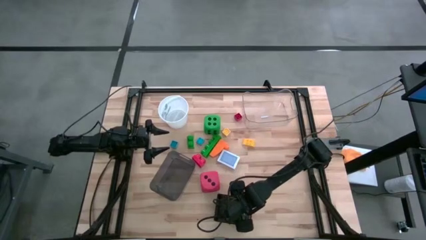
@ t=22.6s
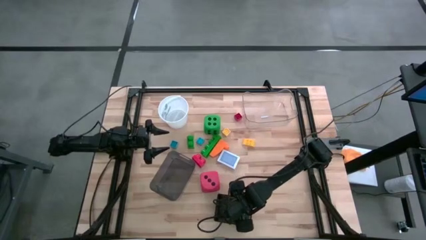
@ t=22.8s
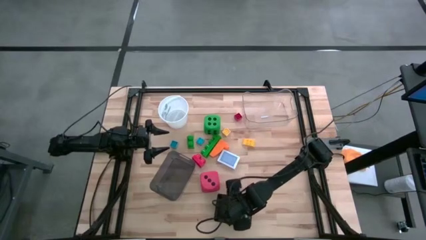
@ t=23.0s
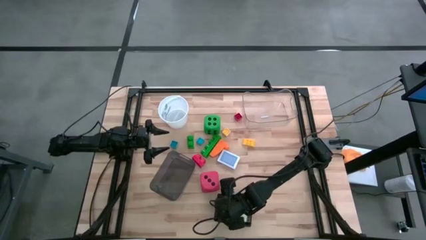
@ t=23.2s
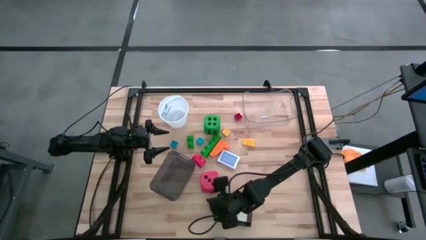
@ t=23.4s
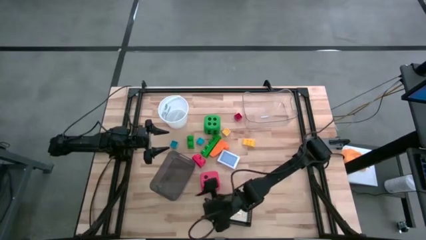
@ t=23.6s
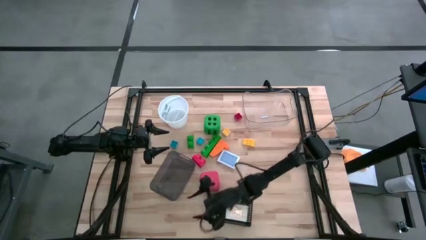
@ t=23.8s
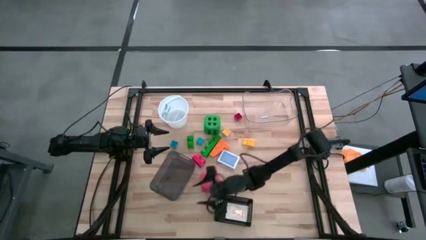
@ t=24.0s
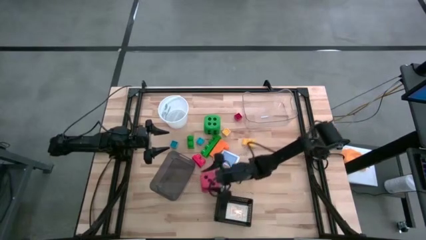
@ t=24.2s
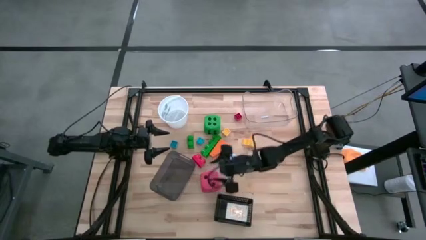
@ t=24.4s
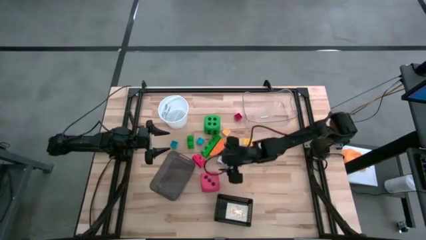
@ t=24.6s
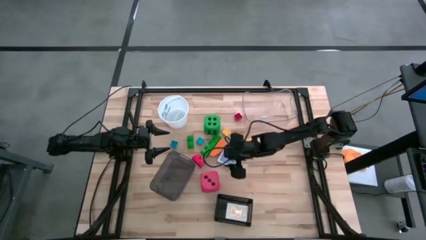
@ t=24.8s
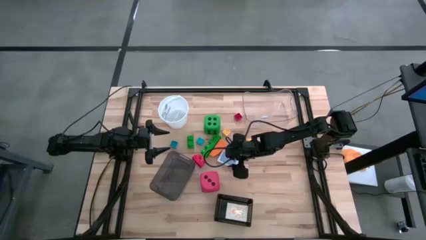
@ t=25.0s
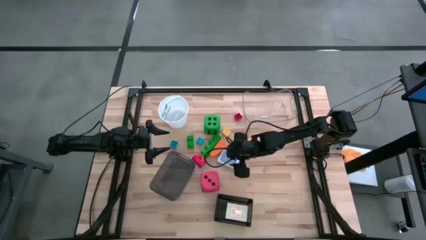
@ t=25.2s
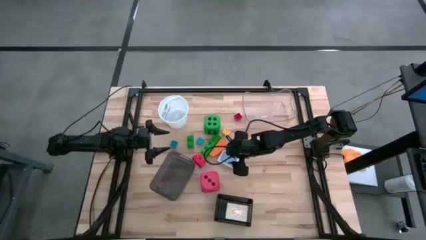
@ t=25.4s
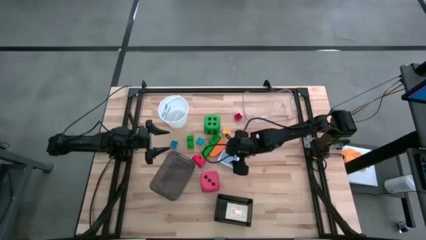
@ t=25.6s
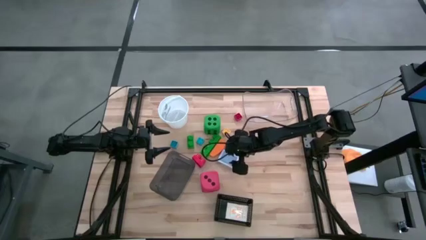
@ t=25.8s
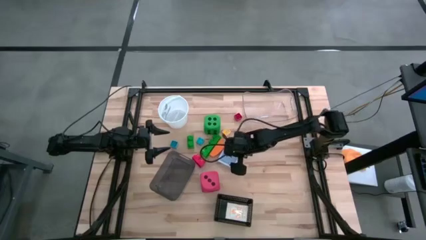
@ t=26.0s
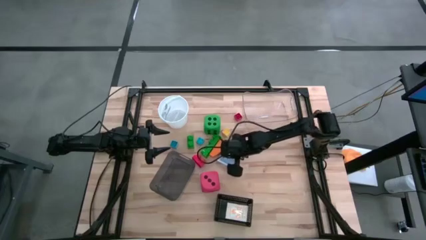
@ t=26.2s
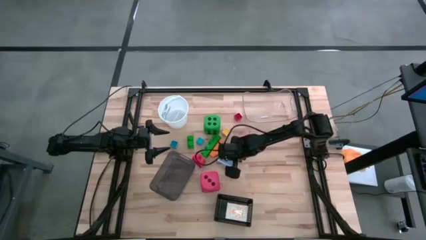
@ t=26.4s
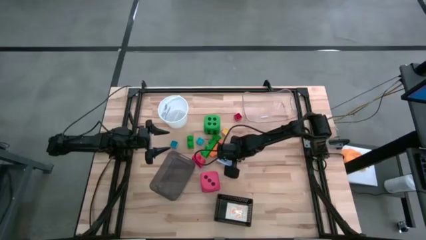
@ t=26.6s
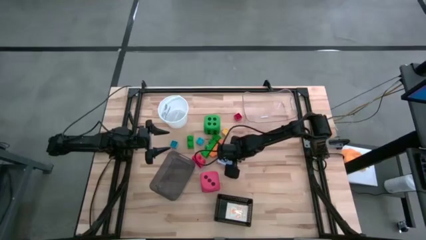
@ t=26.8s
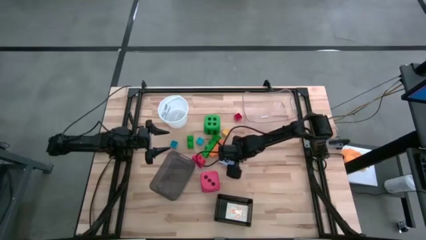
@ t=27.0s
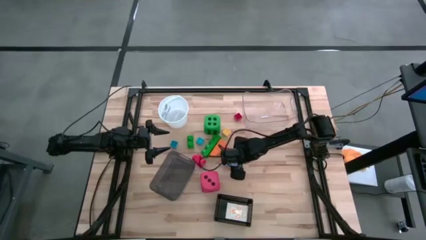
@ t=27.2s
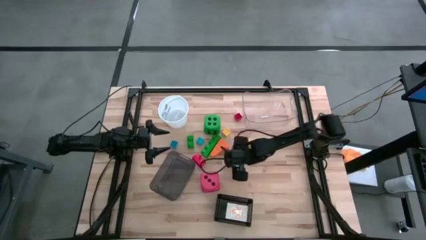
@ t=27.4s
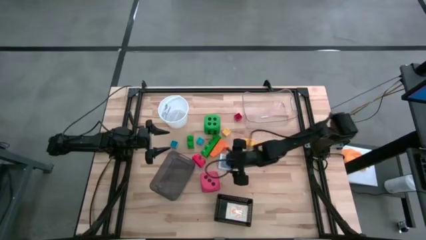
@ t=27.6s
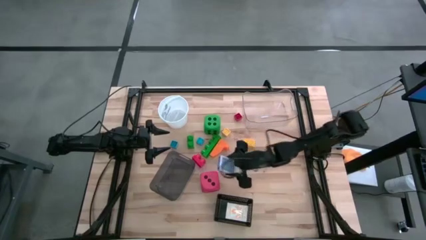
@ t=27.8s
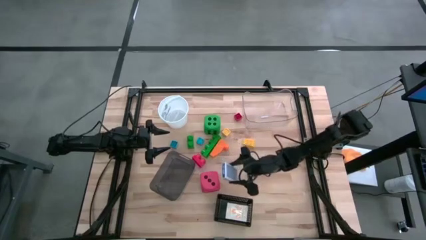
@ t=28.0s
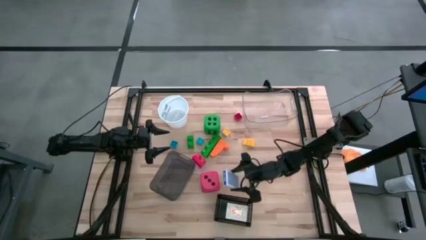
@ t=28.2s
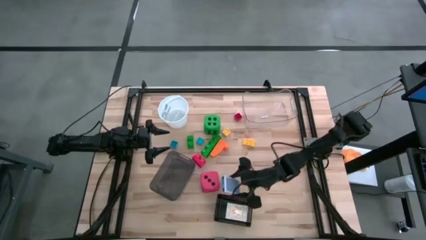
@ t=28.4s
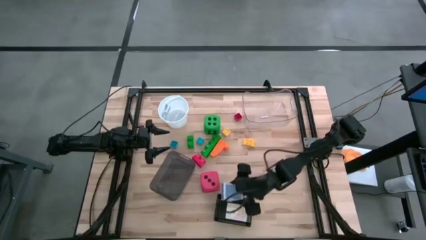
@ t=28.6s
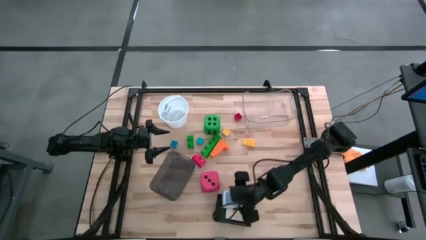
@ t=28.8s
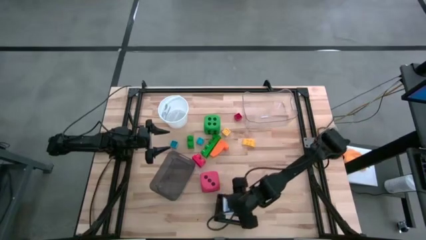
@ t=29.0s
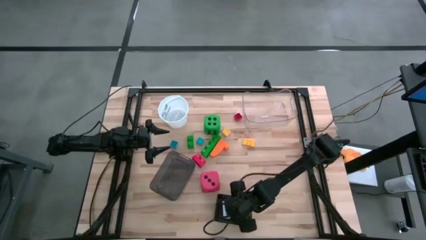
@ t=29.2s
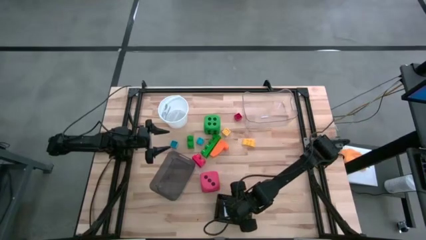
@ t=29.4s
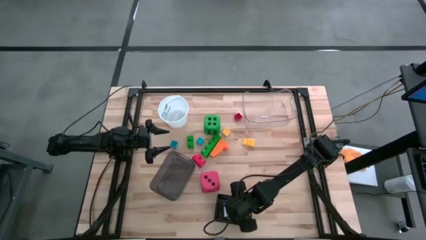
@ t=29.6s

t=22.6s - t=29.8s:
Task: Pick & Place Toys
Put the blue deck of cards into the black bin

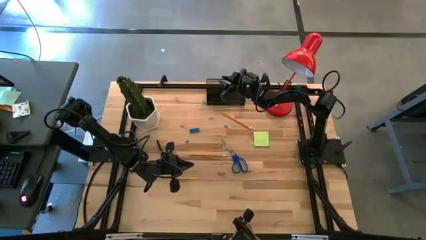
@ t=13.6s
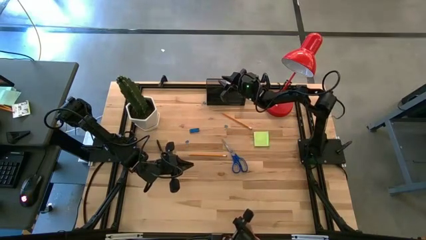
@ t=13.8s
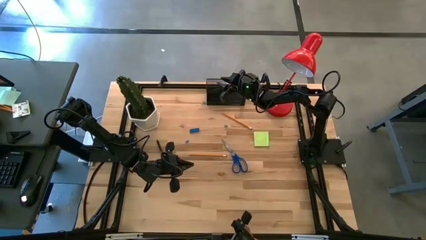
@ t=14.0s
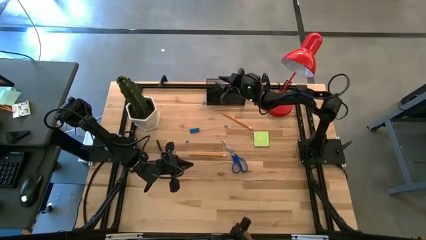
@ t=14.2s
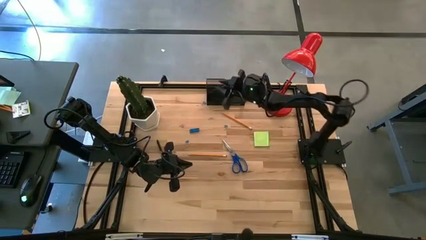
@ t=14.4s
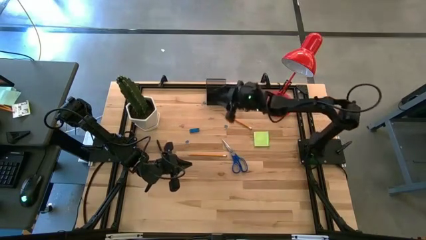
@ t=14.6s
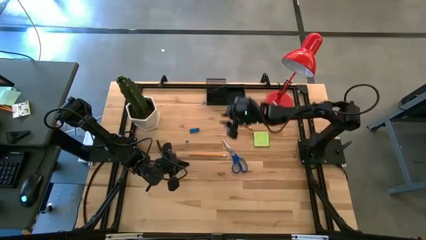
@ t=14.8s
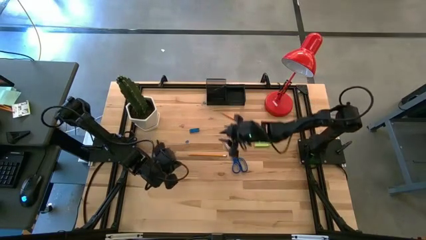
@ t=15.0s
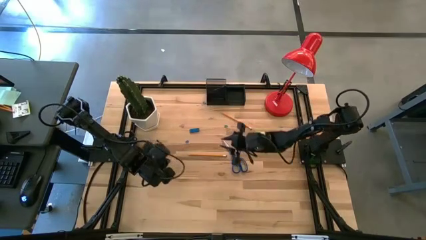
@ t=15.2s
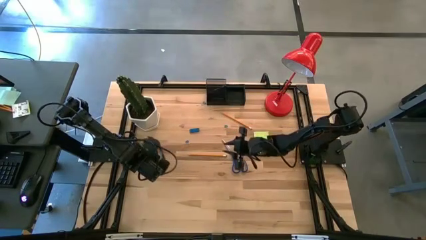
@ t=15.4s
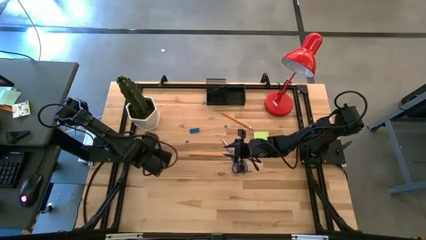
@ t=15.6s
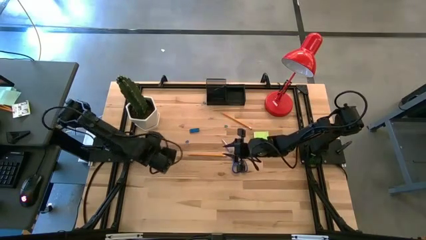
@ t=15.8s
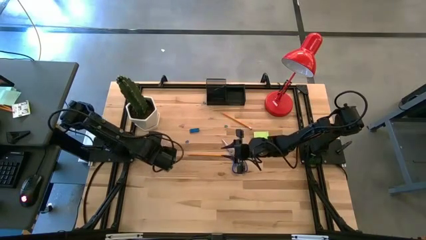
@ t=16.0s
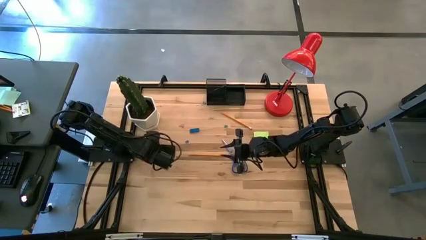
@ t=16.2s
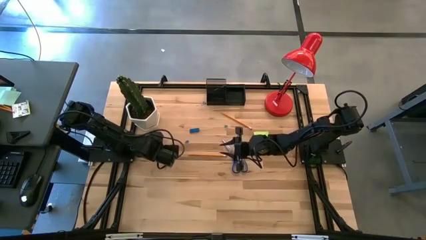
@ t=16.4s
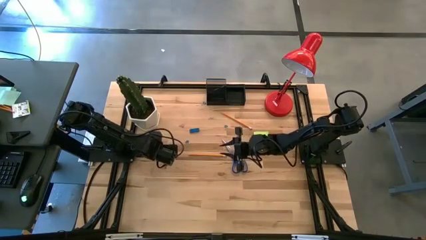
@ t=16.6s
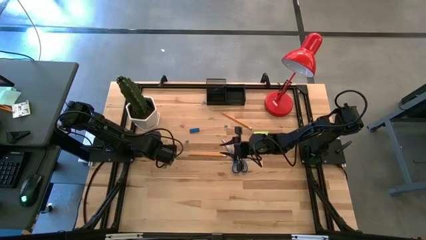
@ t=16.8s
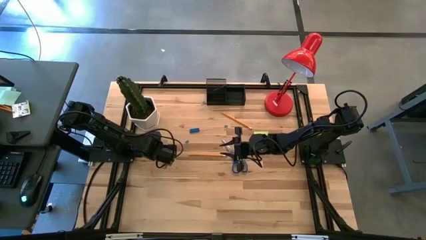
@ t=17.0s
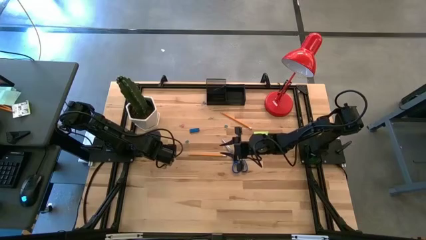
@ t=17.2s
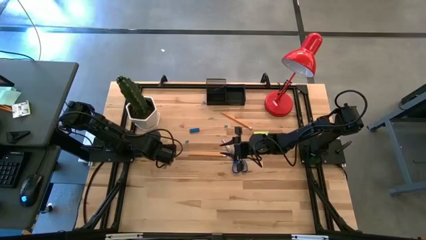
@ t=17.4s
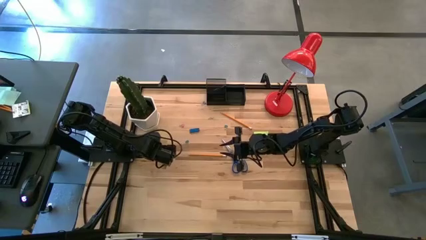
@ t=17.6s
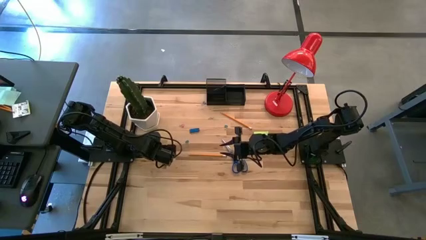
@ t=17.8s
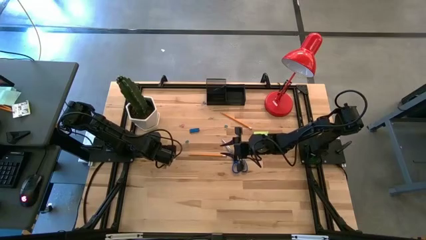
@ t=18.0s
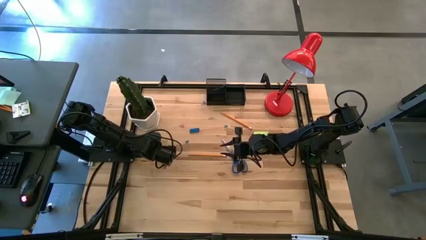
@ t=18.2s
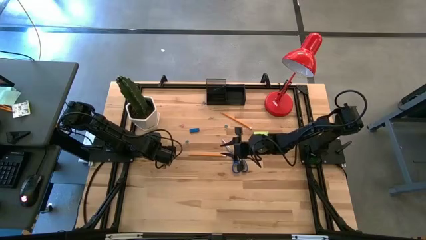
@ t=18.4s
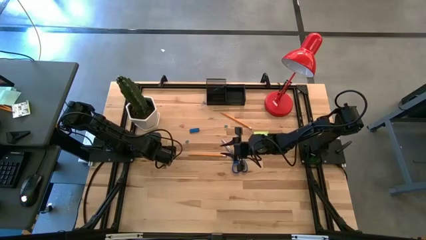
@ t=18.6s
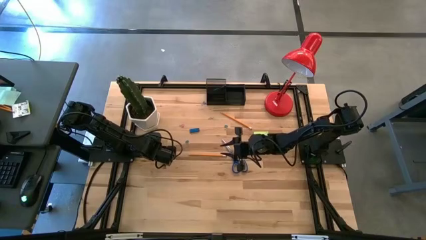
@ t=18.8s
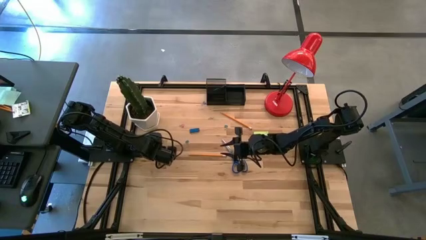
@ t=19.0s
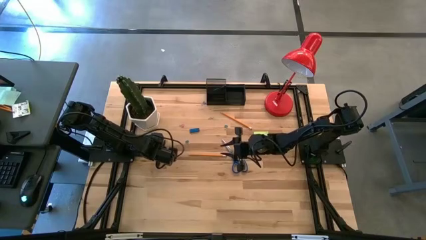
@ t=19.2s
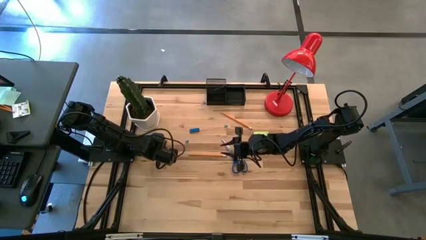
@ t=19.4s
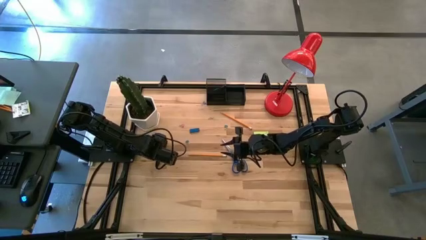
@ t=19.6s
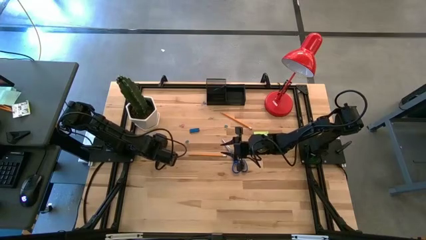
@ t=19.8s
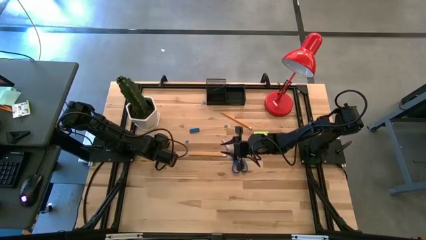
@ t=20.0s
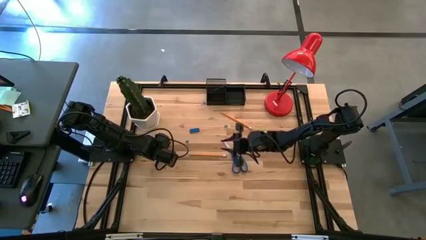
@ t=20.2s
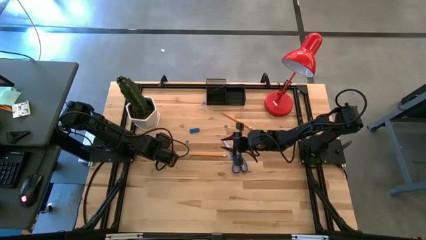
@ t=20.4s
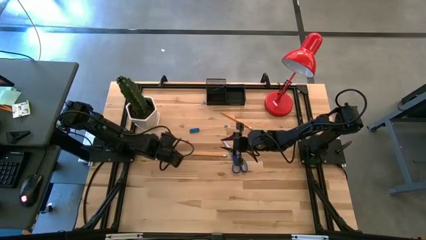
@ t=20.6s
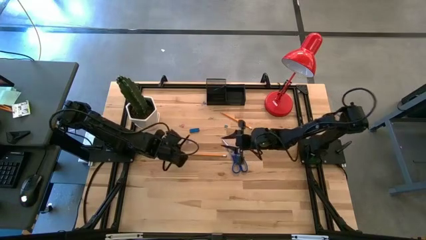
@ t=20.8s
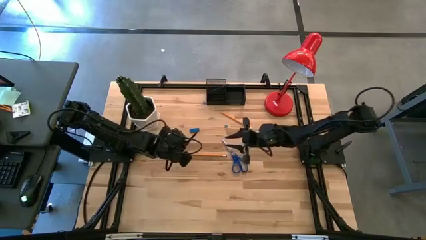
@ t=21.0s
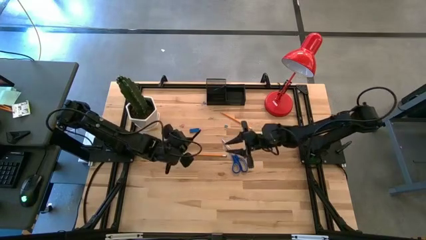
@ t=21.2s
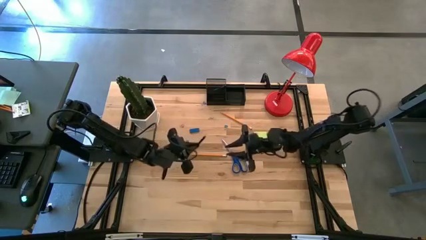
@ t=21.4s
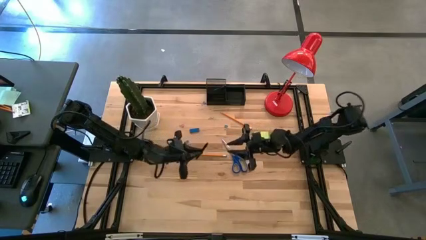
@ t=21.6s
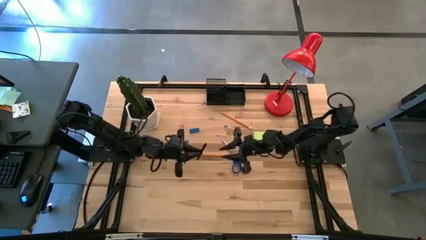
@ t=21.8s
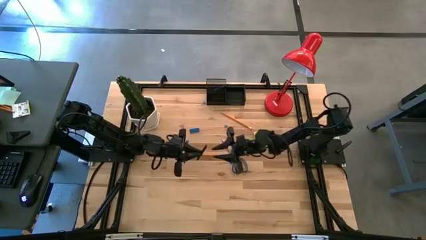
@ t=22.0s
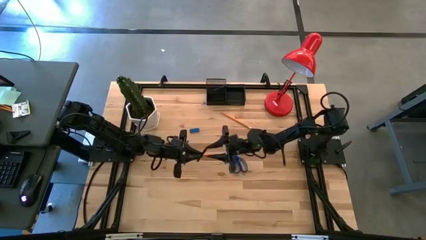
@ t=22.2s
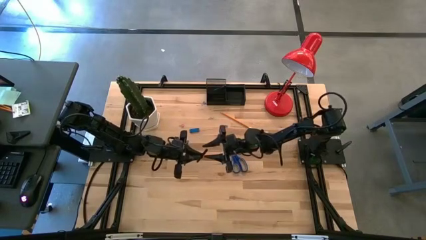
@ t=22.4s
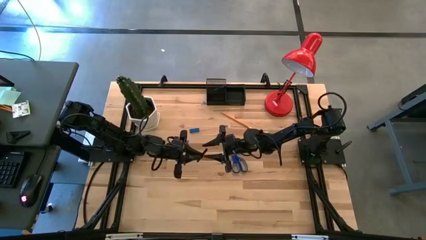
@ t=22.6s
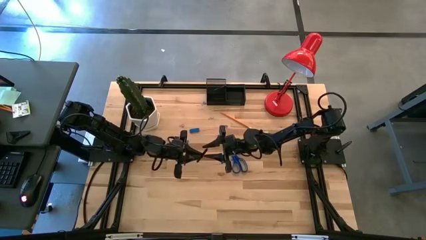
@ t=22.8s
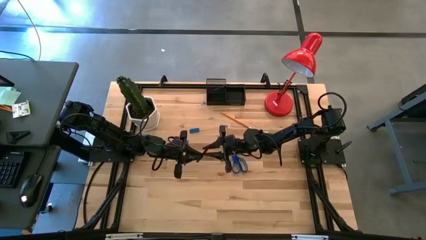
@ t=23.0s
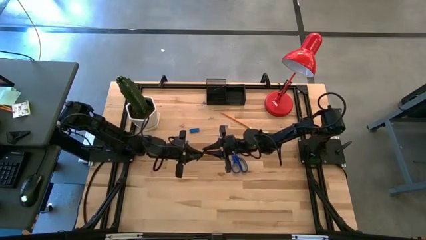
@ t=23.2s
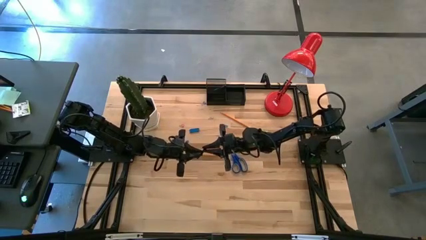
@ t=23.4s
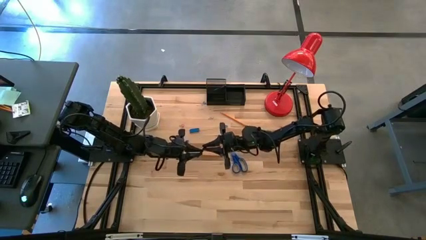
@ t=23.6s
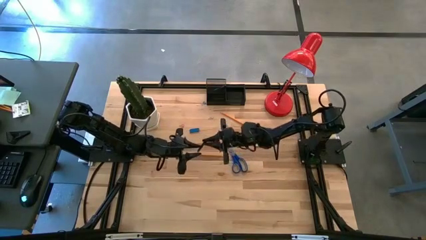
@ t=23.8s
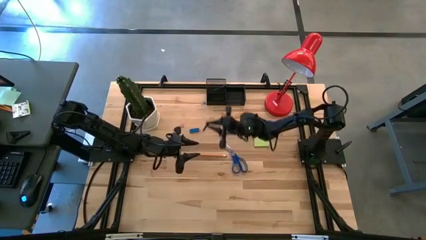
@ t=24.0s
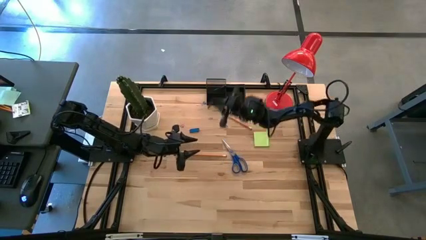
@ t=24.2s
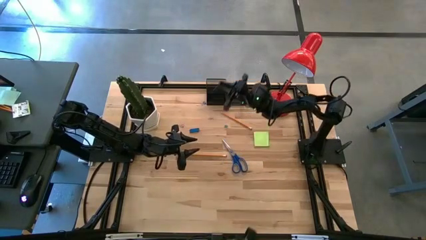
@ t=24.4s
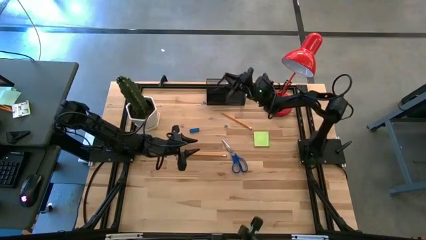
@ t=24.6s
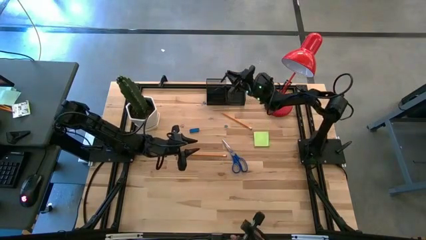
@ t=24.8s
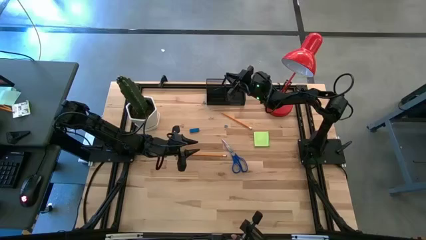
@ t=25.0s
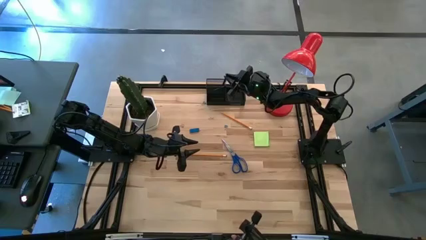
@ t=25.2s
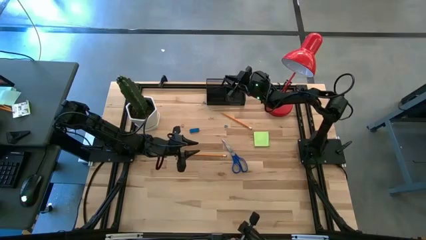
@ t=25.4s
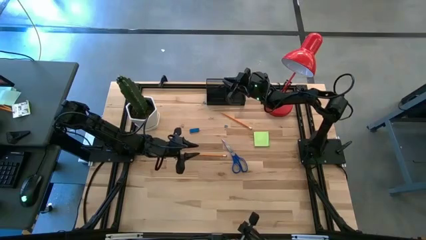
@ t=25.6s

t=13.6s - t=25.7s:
Task: Pick and place office supplies into organizer
Put the black pen into the top left section of the desk organizer
